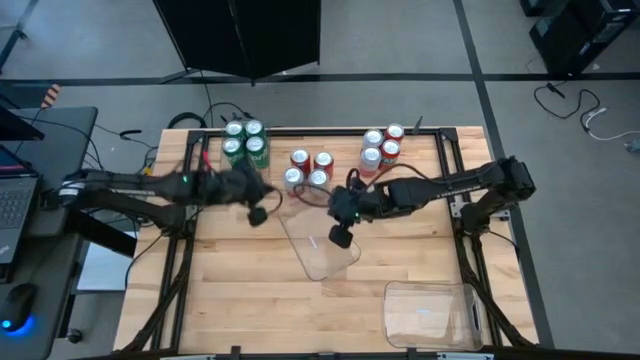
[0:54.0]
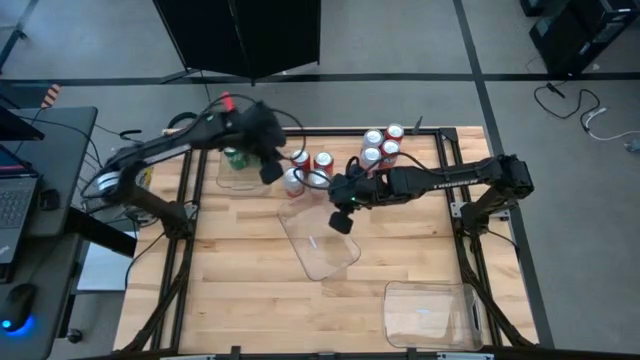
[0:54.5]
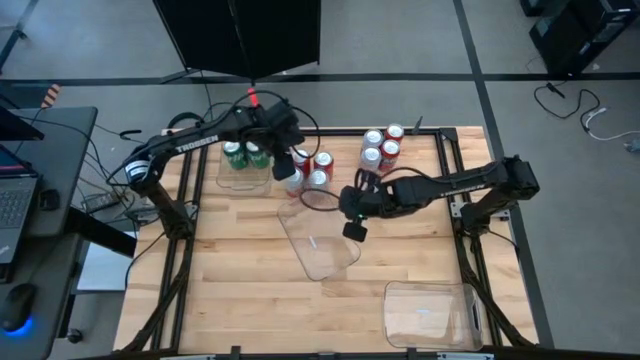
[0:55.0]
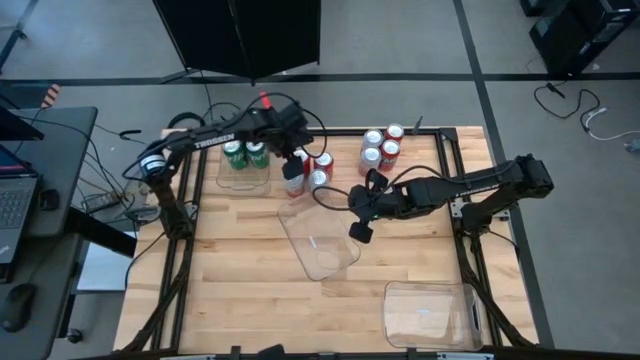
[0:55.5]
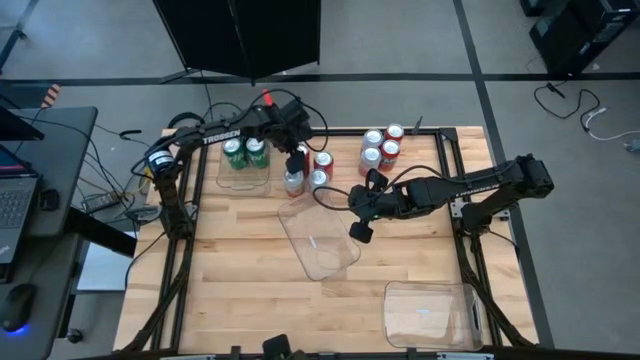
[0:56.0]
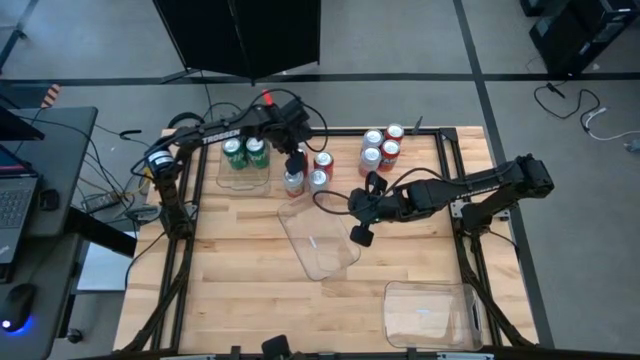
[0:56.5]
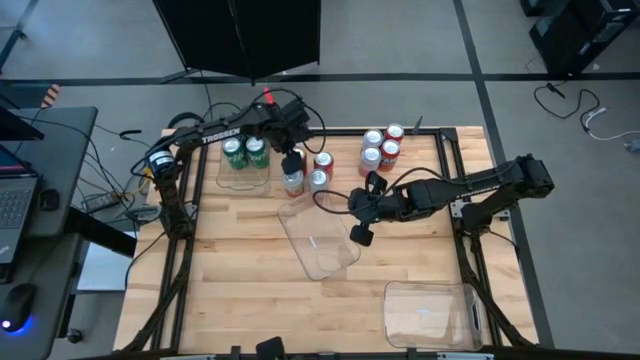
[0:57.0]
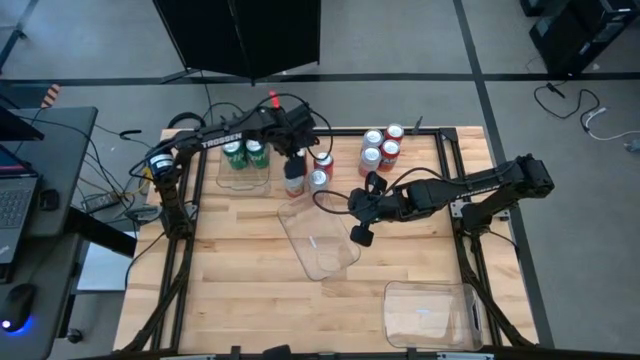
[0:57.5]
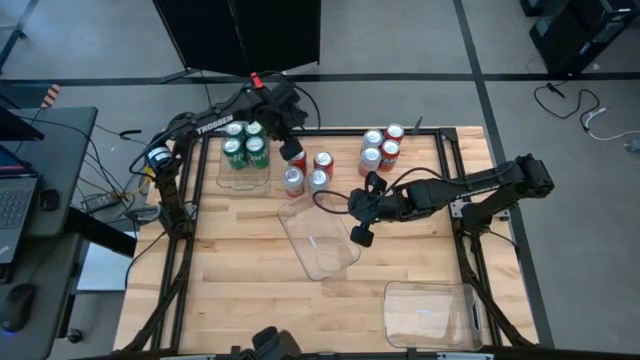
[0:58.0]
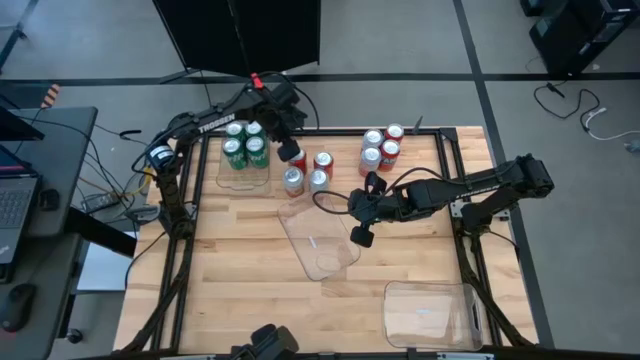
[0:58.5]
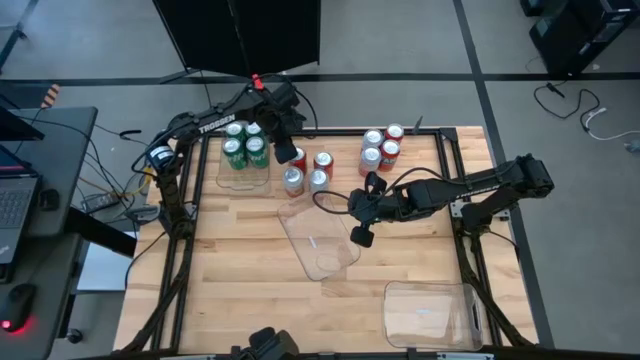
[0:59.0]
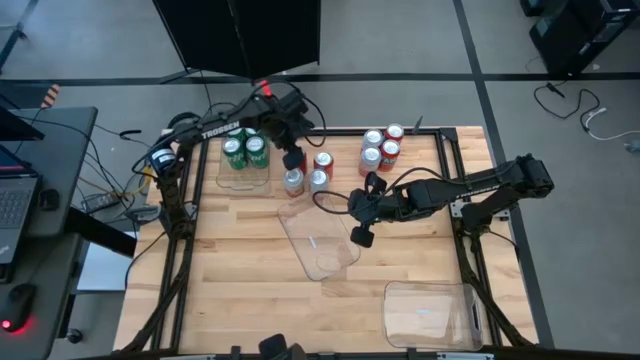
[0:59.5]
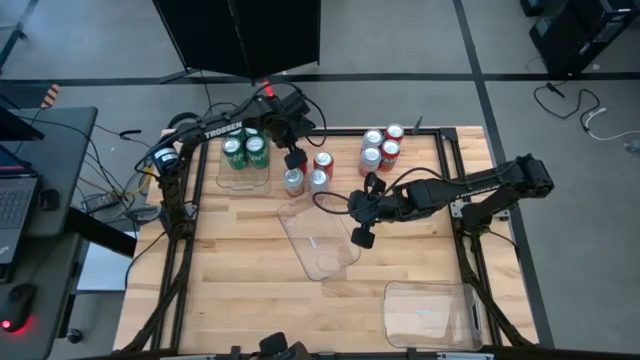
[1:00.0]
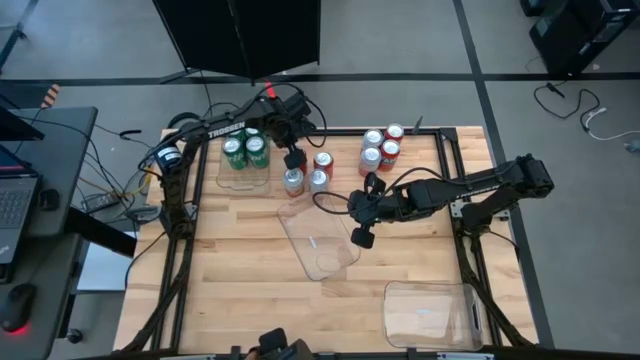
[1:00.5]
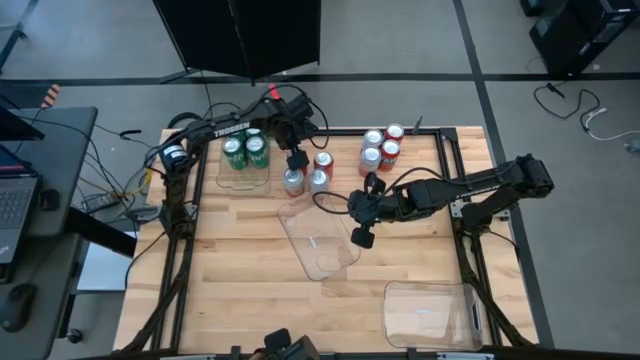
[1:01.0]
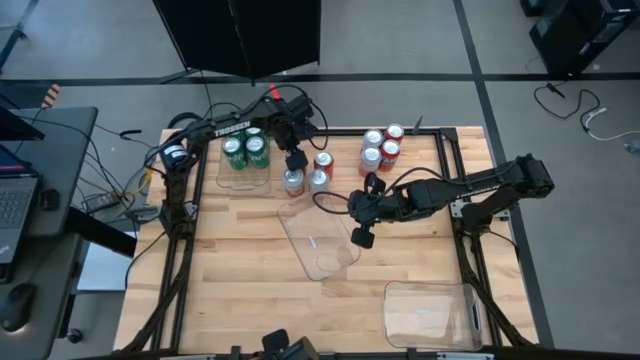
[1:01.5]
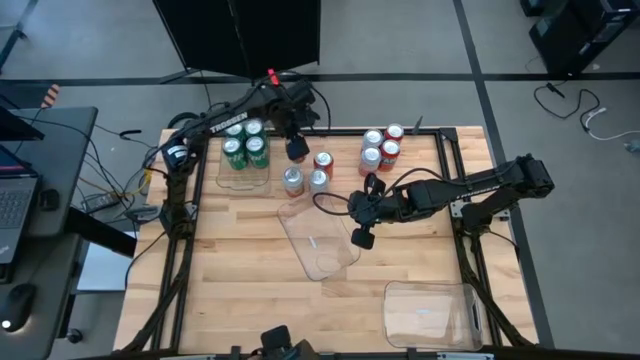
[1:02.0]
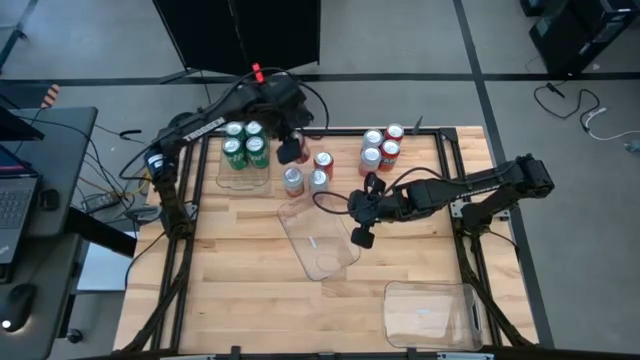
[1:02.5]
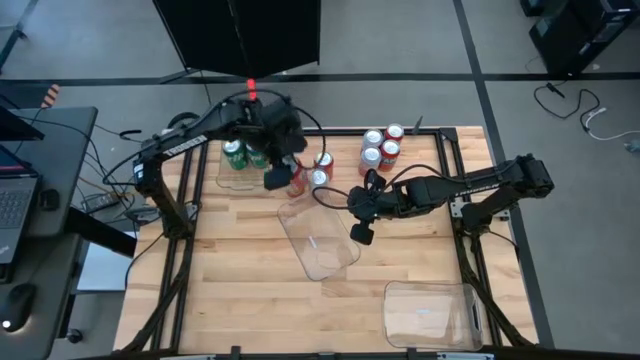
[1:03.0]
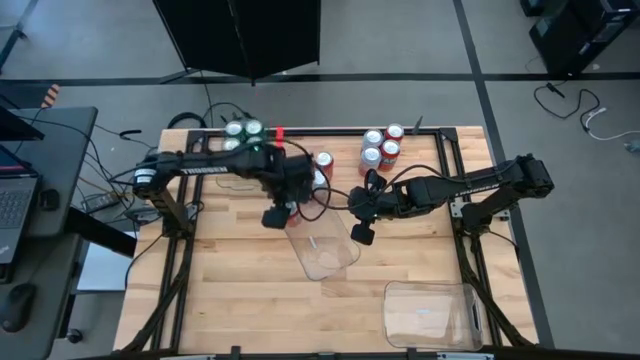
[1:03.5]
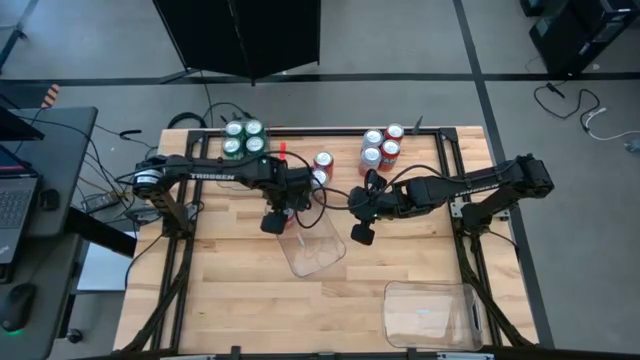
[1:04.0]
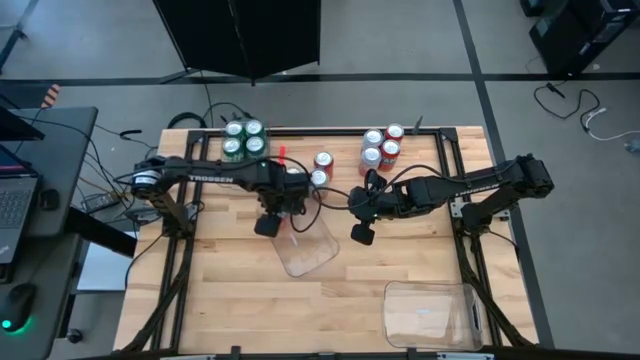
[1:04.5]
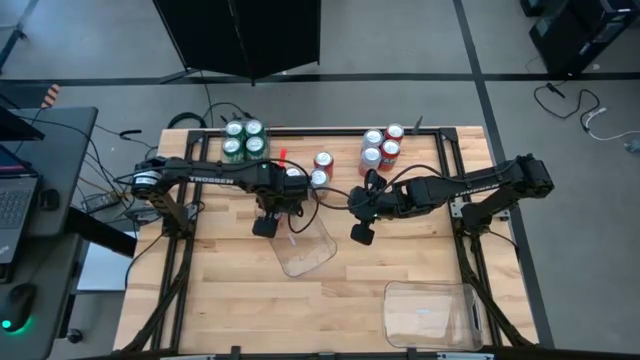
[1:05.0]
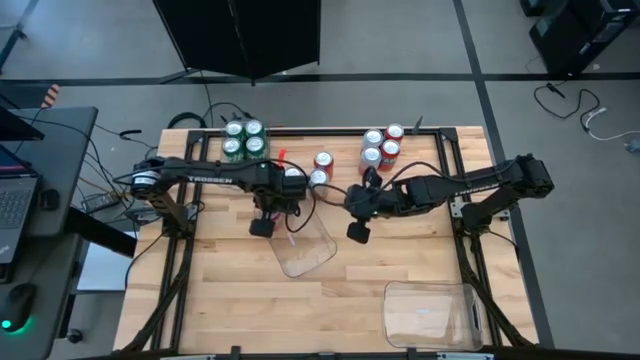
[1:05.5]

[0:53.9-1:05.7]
Task: Sort soda cans
Put the bottom left orange soda can into the center transparent bin

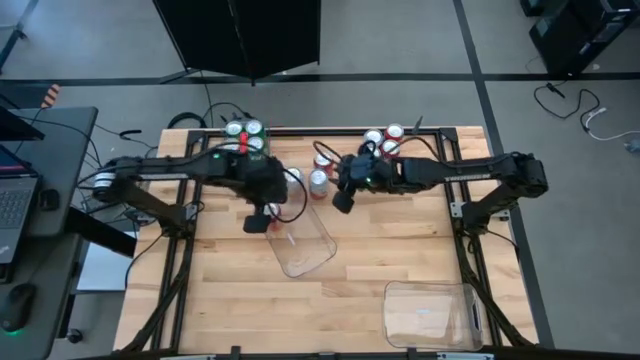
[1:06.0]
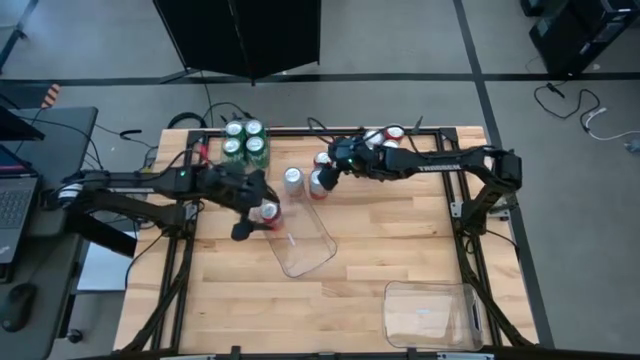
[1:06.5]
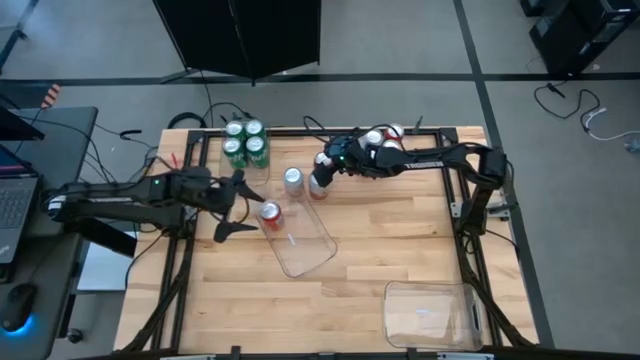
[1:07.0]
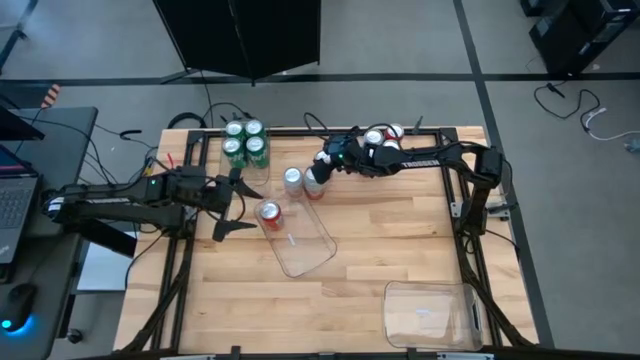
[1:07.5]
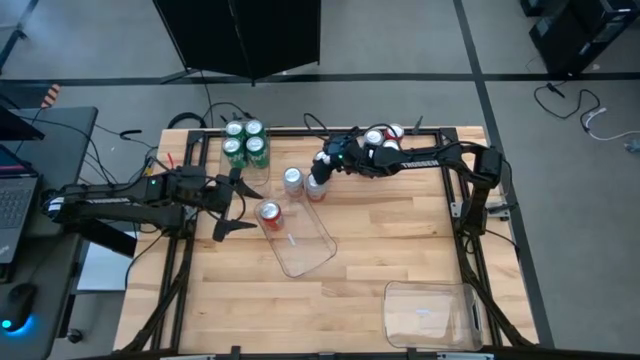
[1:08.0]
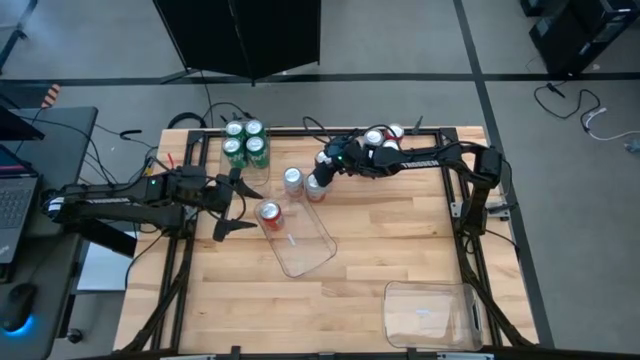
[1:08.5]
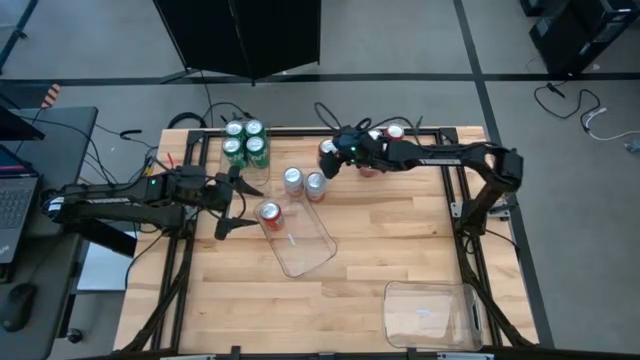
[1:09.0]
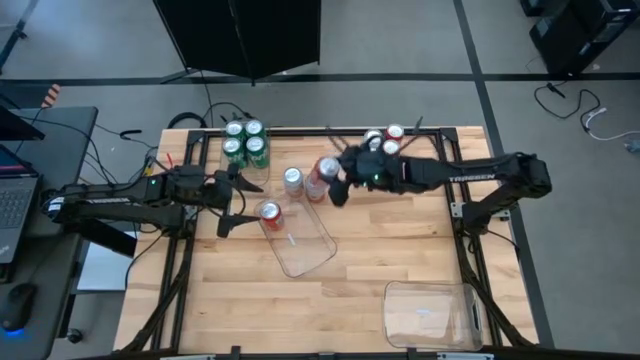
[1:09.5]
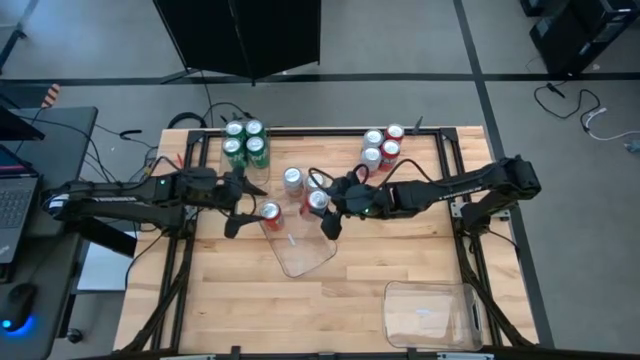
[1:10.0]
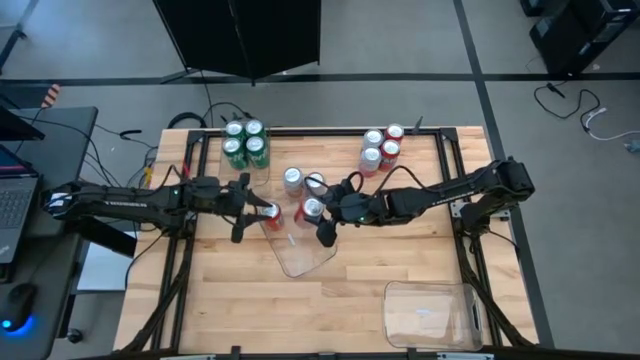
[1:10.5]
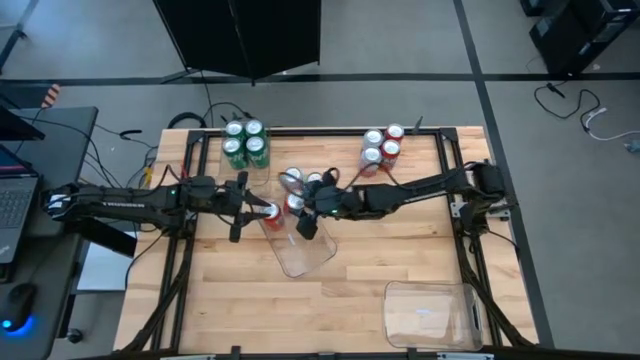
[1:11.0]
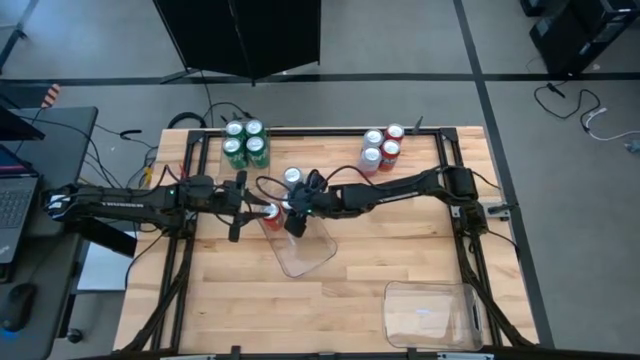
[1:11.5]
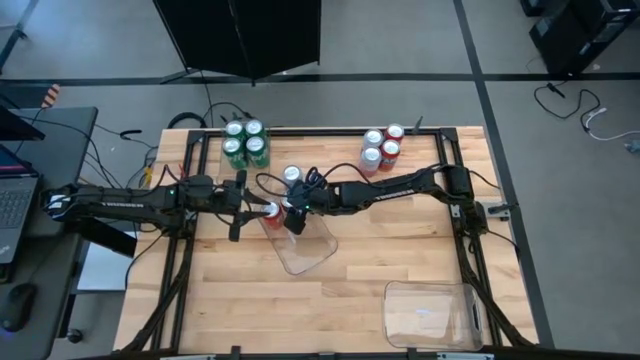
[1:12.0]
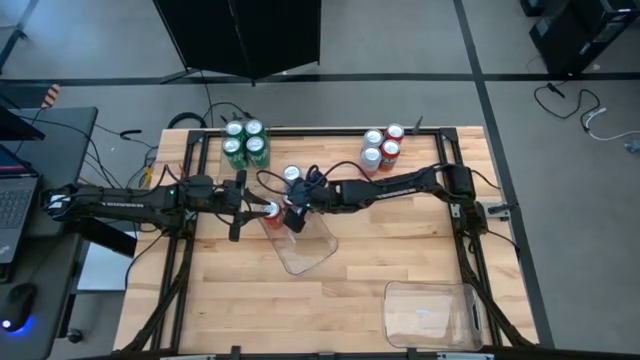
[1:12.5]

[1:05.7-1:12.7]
Put the bottom left orange soda can into the center transparent bin

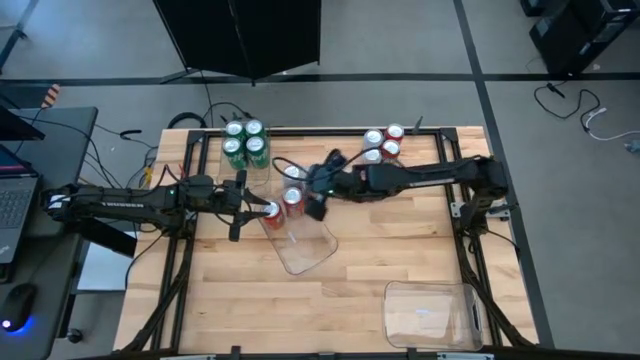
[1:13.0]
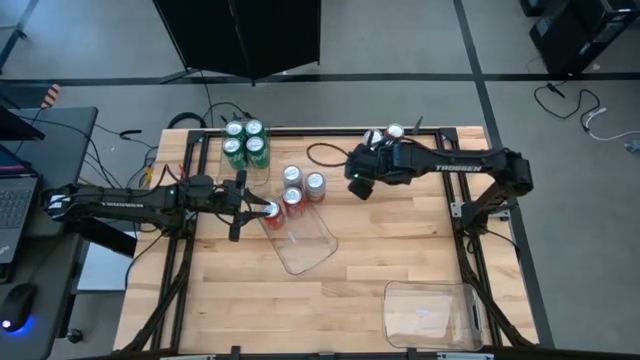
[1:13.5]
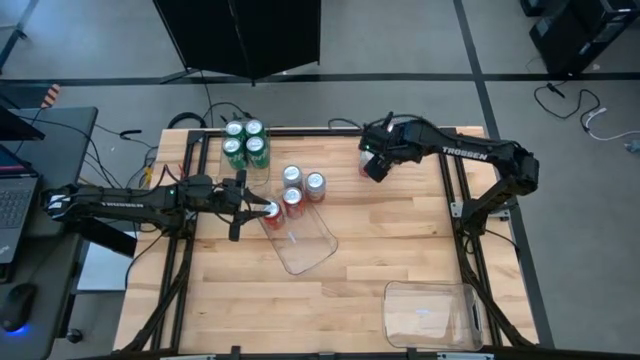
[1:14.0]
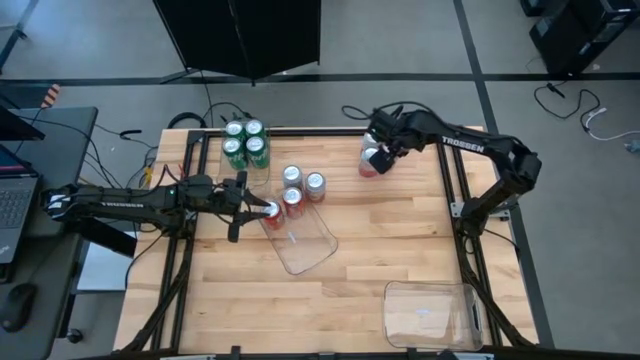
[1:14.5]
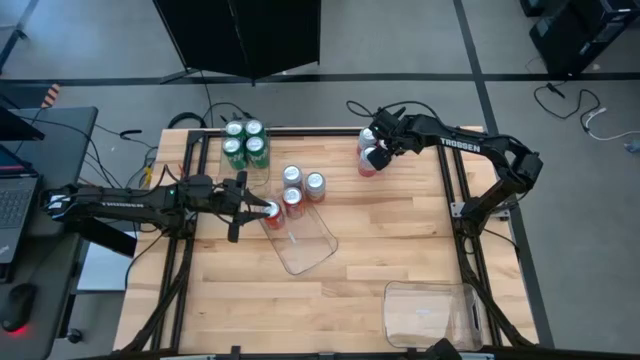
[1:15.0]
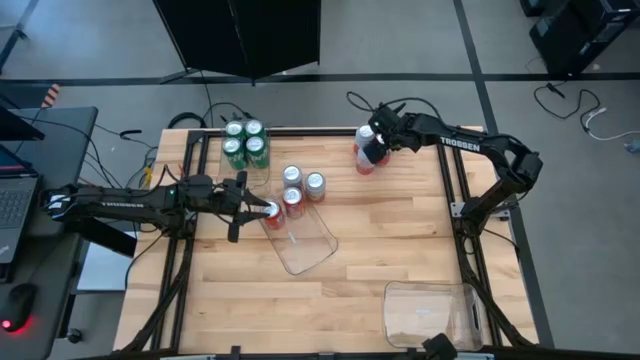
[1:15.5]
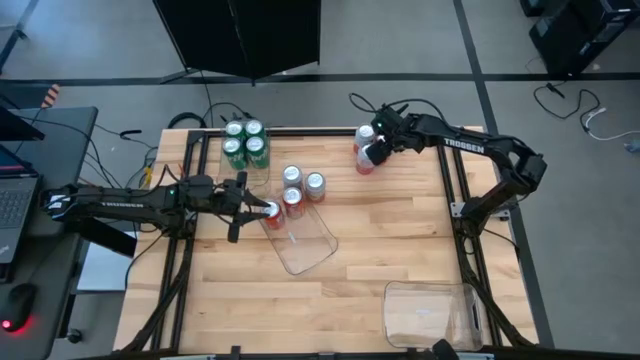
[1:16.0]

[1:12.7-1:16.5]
Put the bottom orange soda can into the center transparent bin
